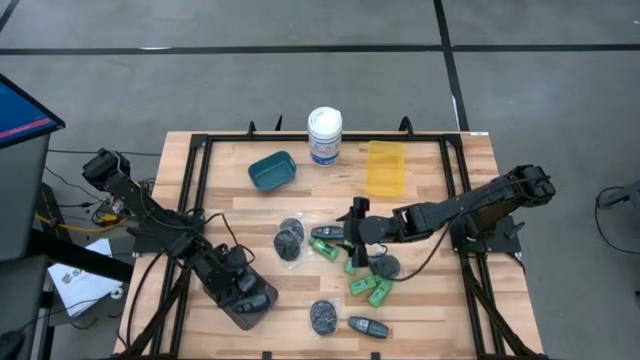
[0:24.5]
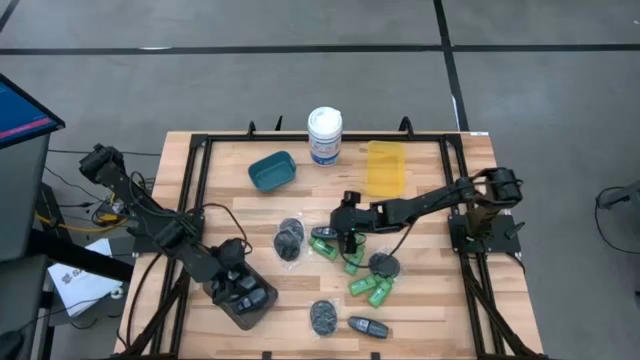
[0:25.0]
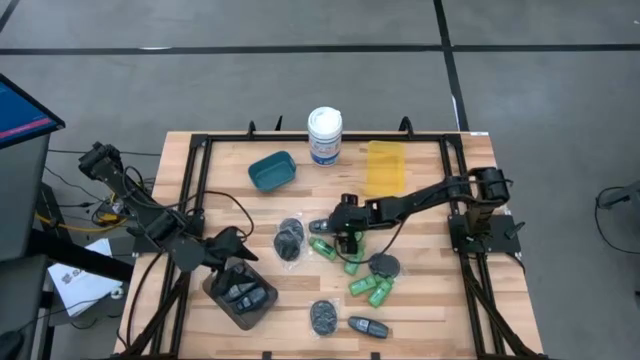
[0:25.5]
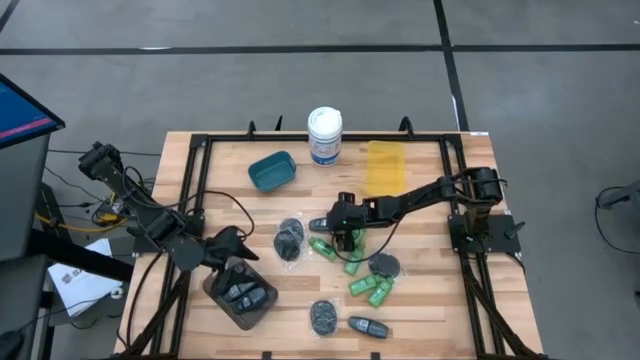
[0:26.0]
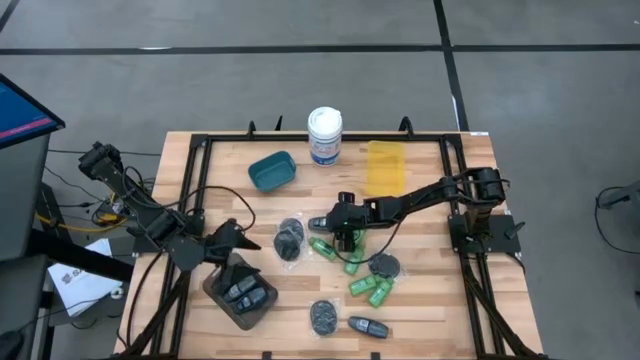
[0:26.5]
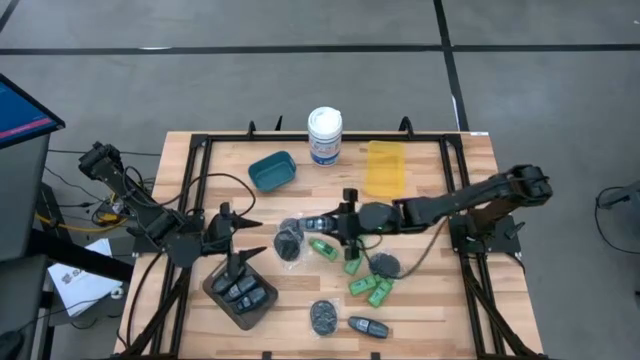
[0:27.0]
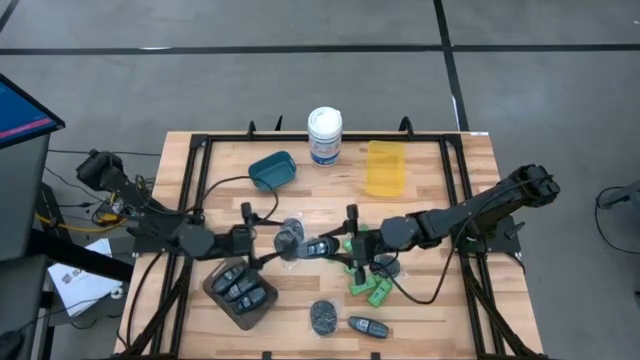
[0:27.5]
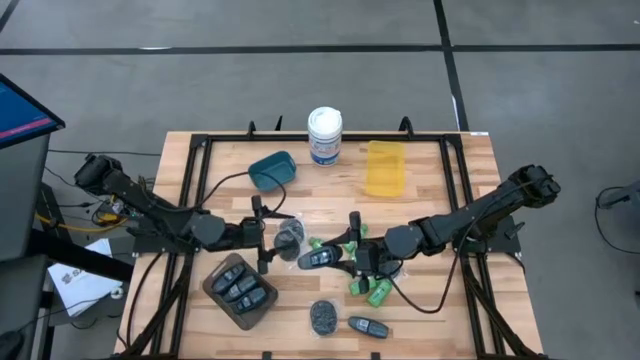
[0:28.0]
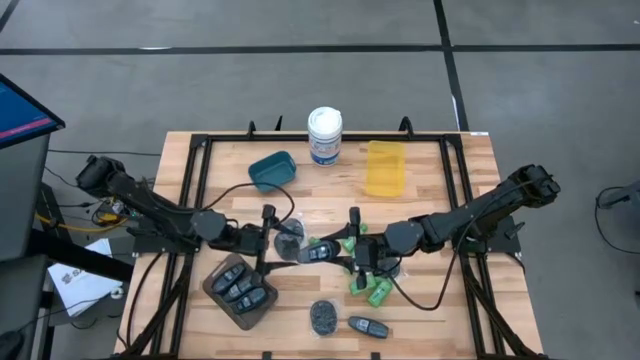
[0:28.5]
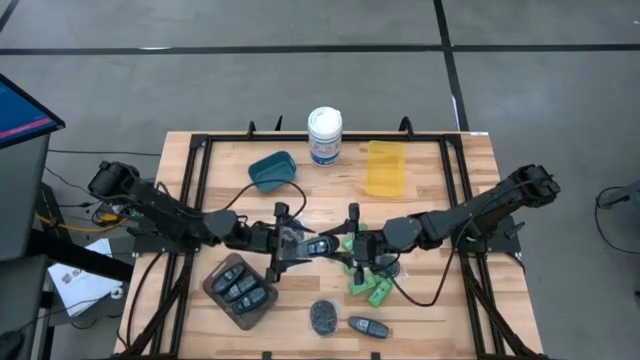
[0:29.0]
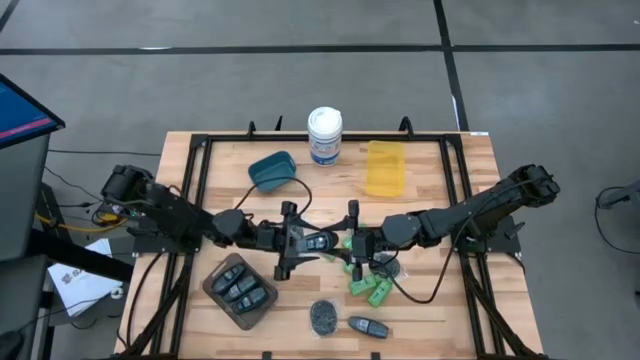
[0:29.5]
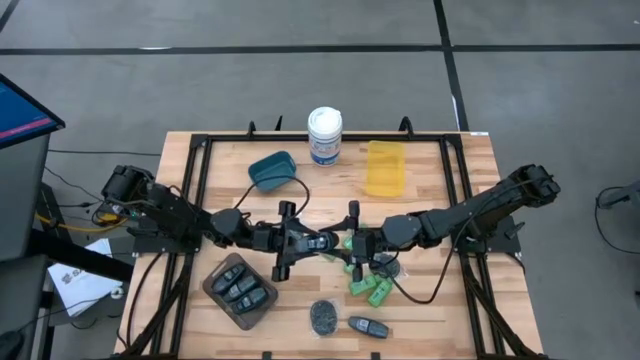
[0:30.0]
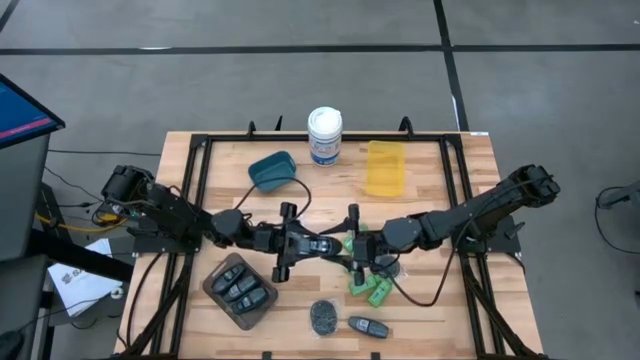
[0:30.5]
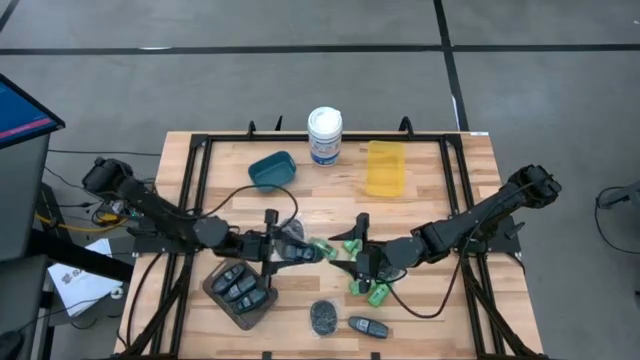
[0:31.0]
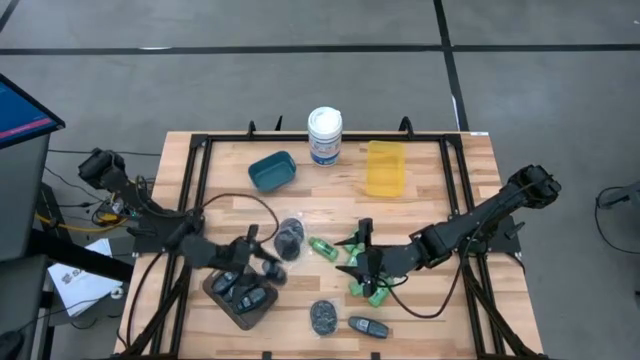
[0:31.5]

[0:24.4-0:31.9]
Task: Pick & Place Travel size toiletries
Put the black deodorant into the black bin

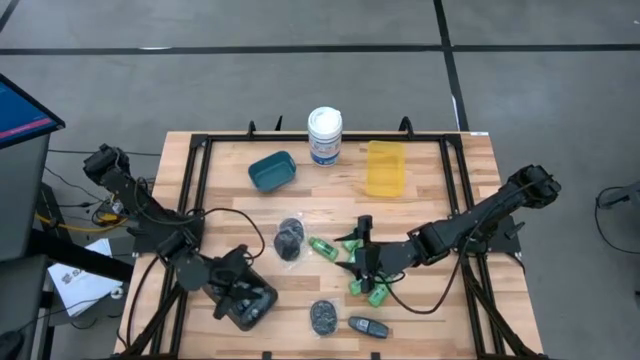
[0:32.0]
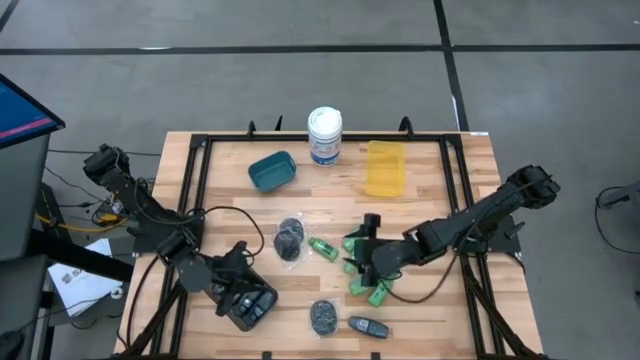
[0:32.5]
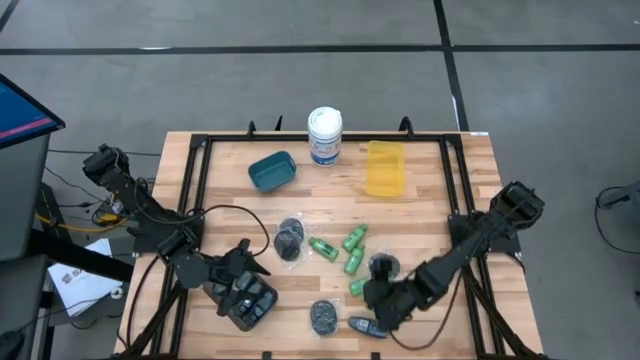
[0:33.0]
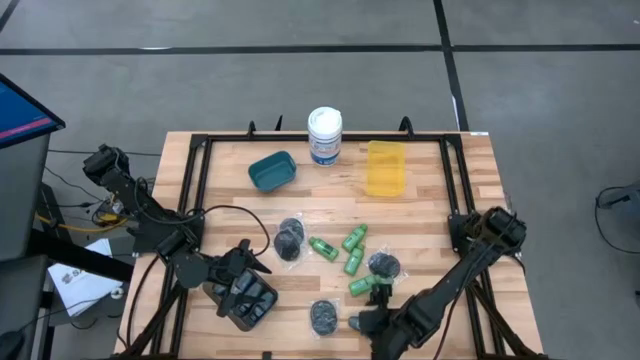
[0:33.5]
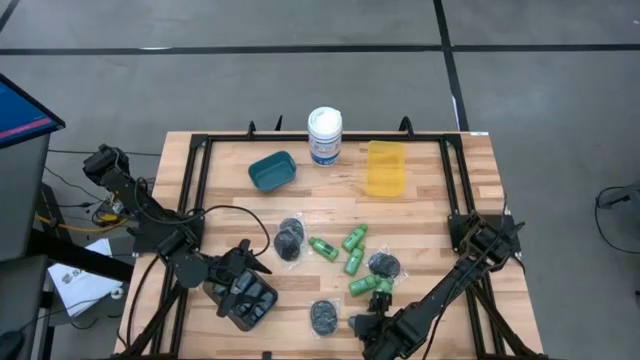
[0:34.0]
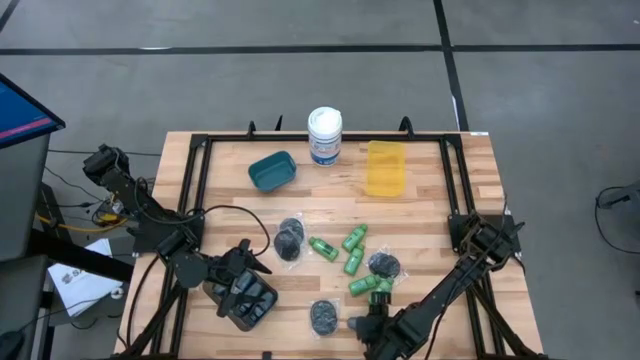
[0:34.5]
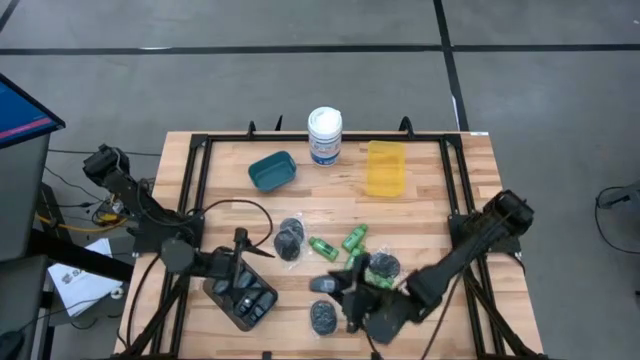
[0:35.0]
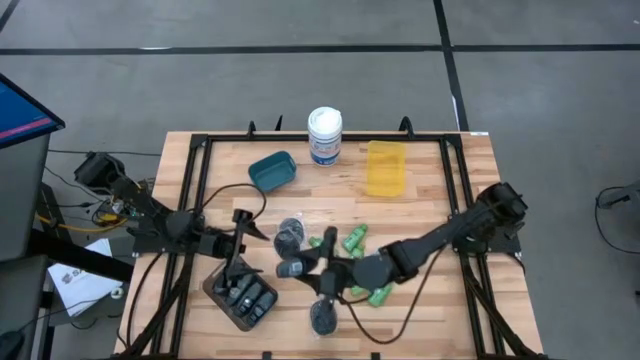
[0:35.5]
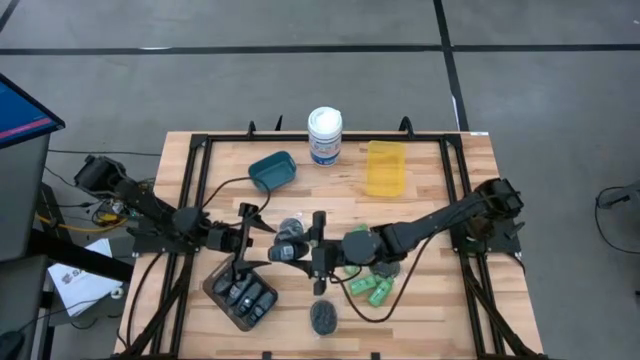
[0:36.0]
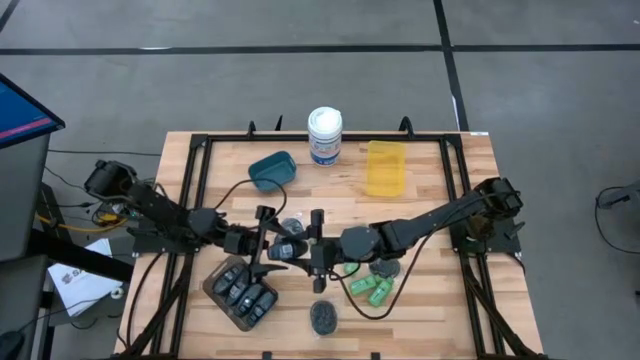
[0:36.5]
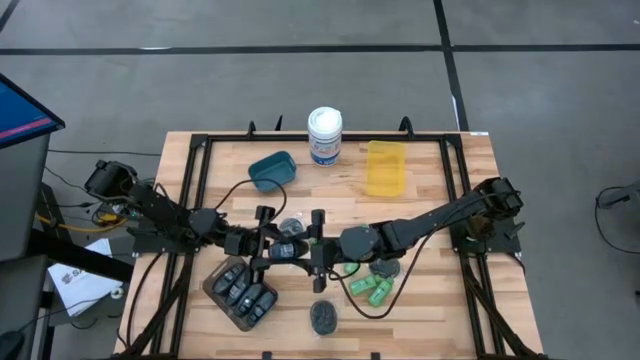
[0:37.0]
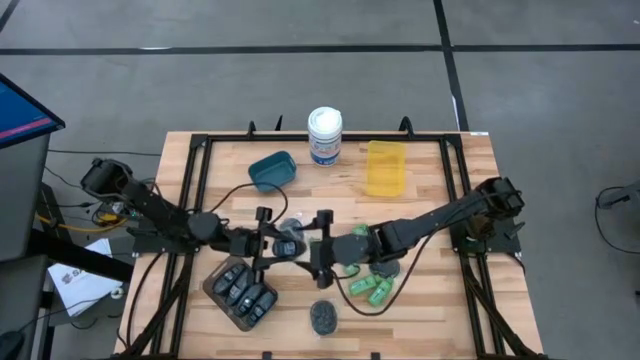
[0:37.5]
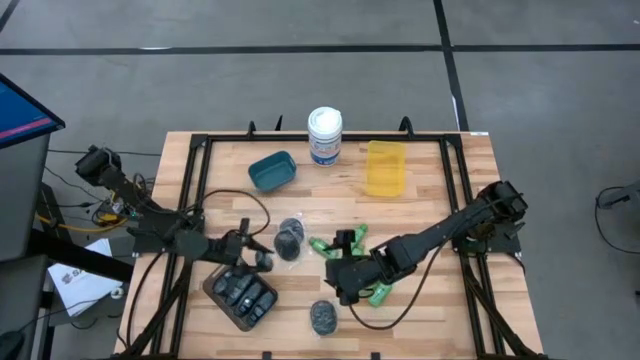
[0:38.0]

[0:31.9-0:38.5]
Put the black deodorant into the black bin

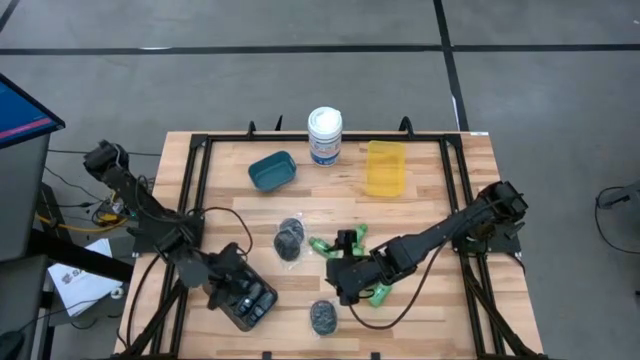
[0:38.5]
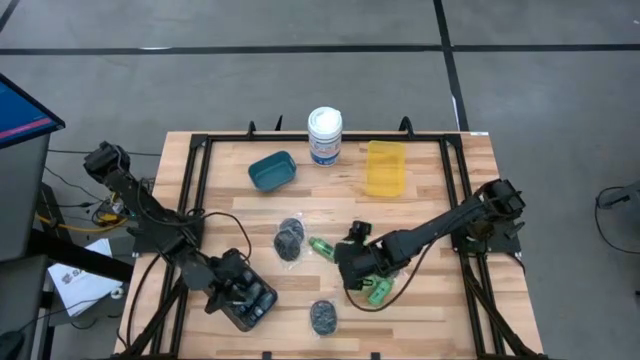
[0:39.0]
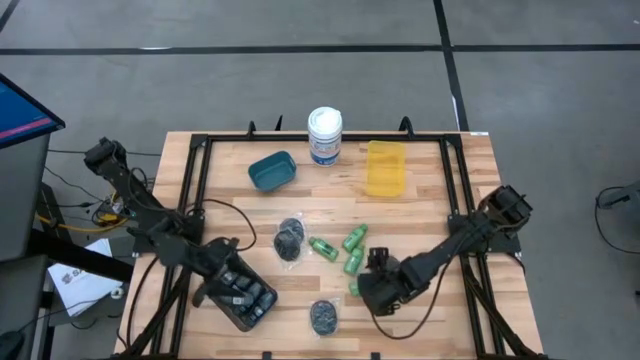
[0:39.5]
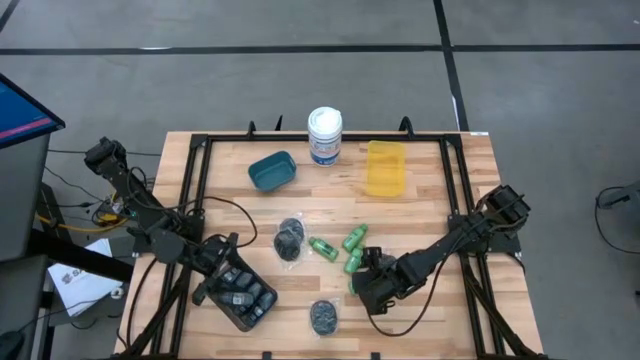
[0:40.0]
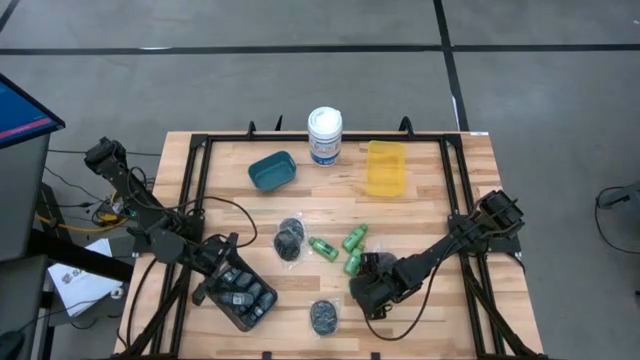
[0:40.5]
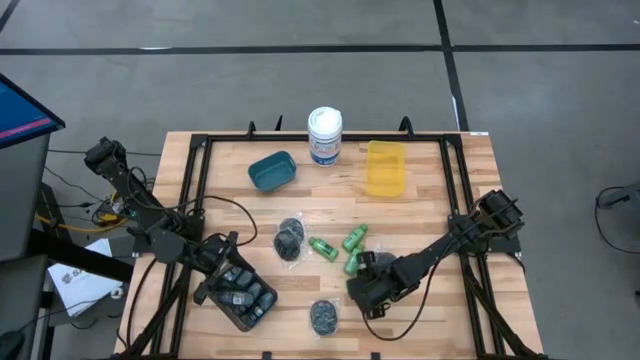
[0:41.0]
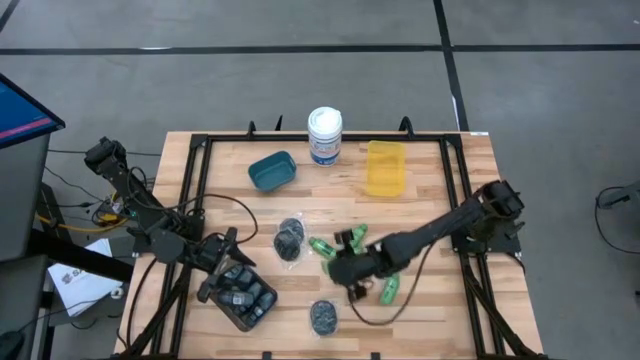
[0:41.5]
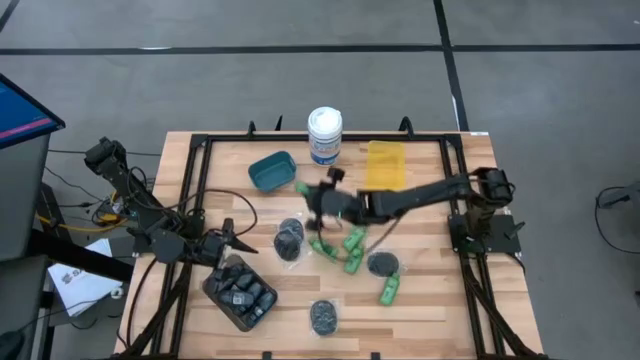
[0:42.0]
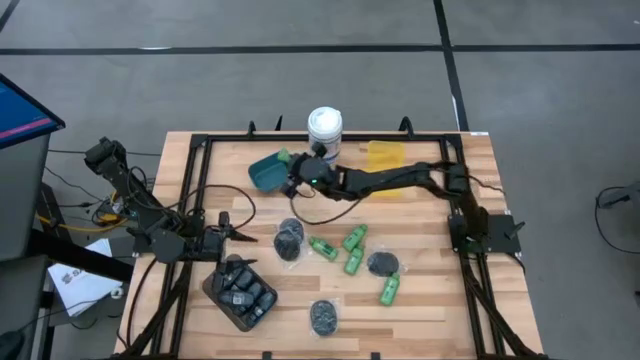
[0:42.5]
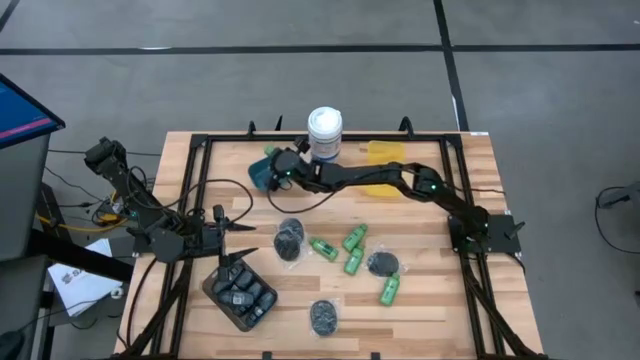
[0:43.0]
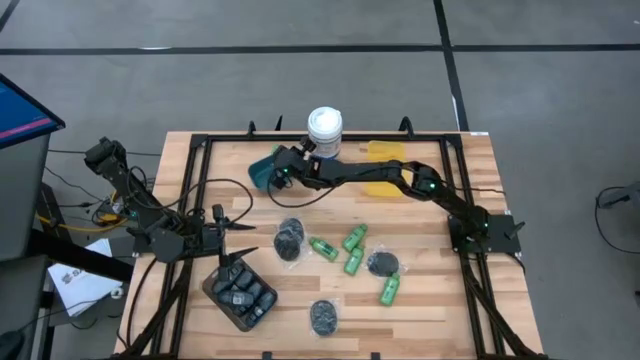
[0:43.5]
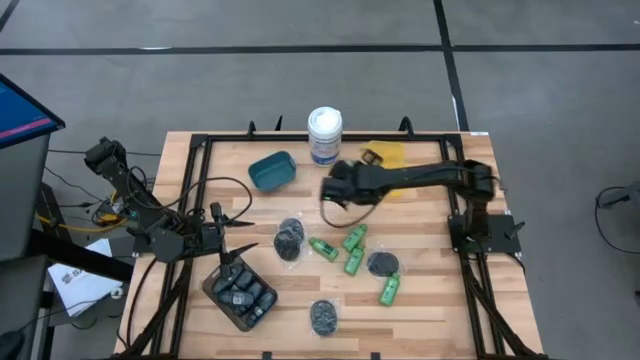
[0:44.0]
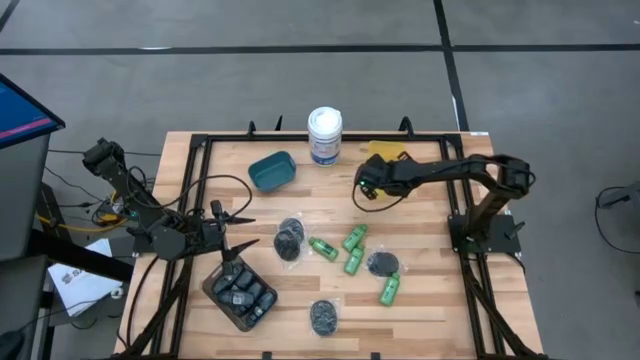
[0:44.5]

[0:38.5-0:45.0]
Put the green shampoo bottle into the yellow bin

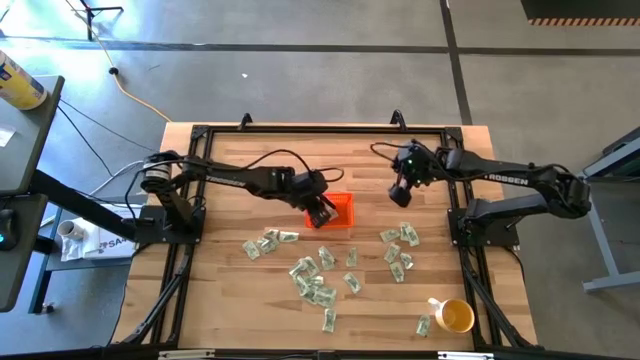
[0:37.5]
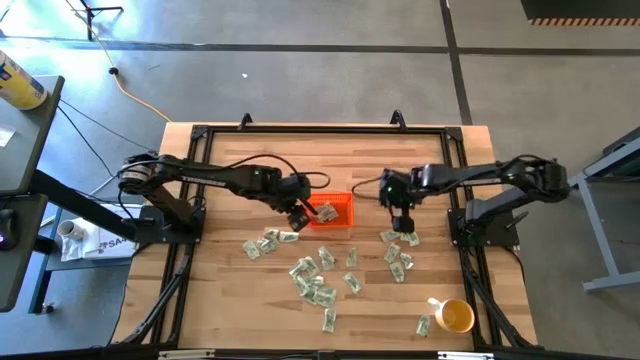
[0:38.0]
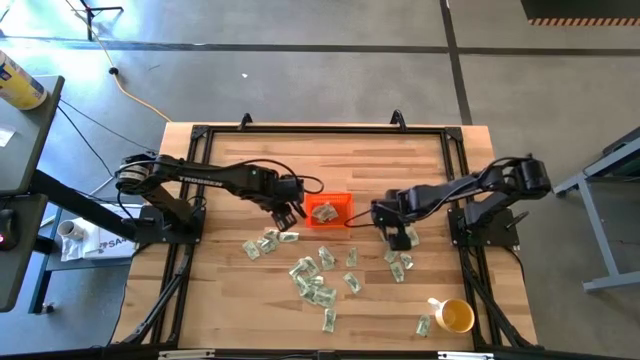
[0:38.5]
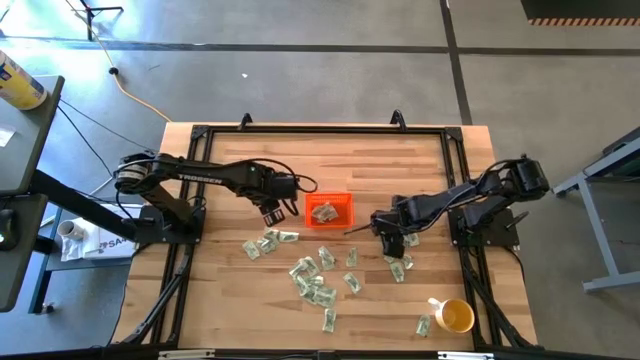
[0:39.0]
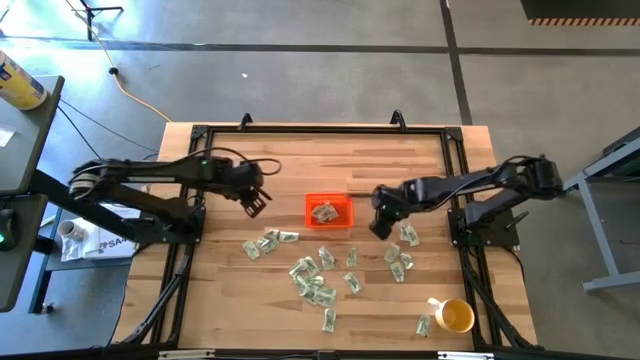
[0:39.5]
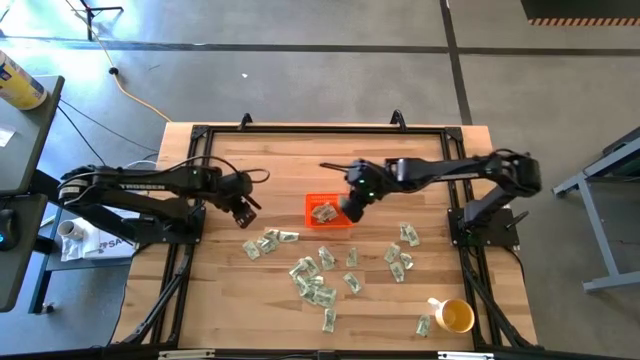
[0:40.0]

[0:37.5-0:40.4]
Task: Pick and place Stevia / Truvia into bins
Put the stevia packet into the orange bin
